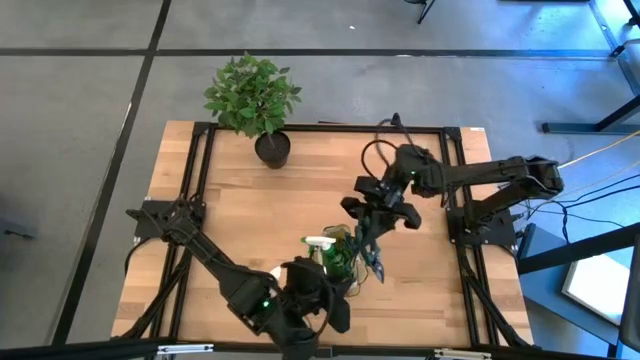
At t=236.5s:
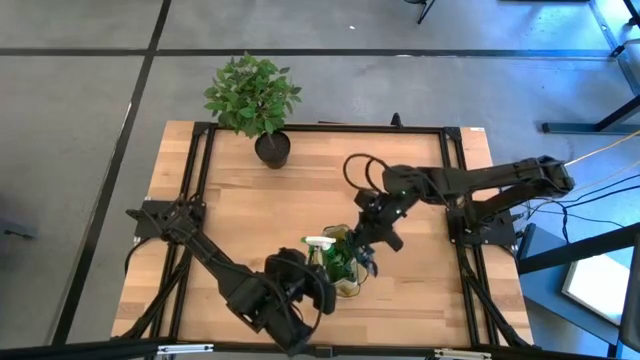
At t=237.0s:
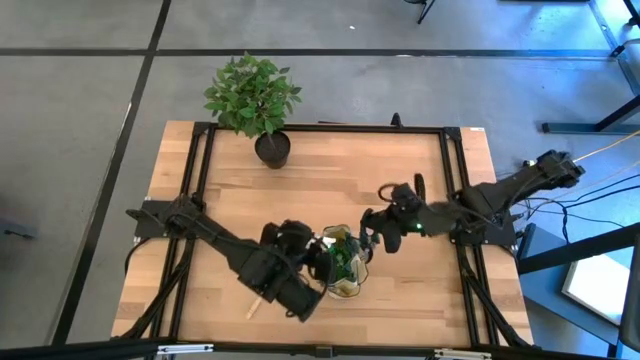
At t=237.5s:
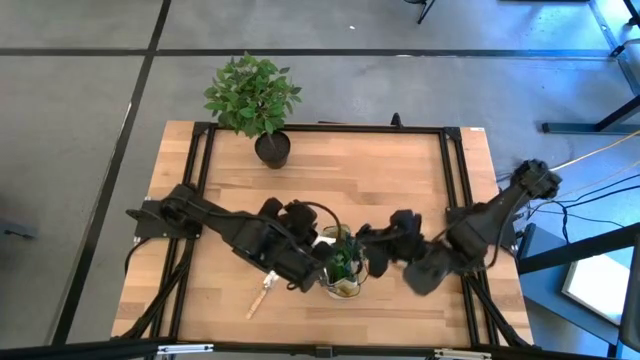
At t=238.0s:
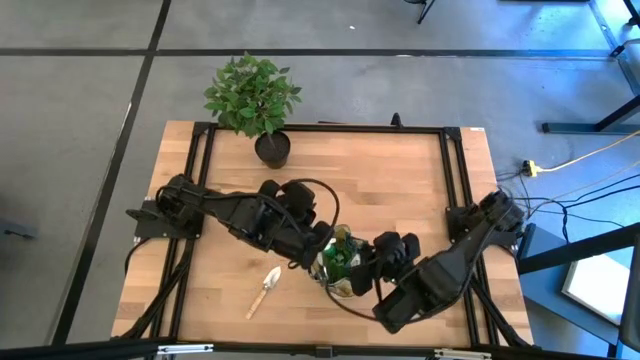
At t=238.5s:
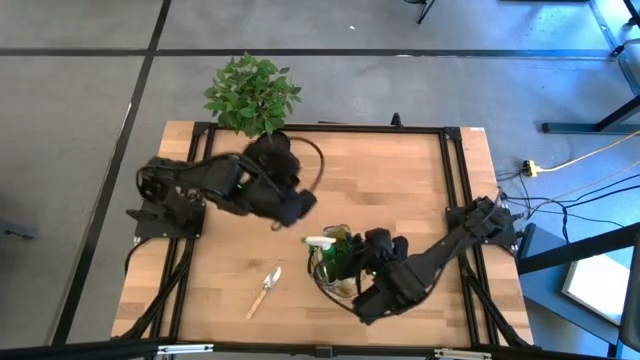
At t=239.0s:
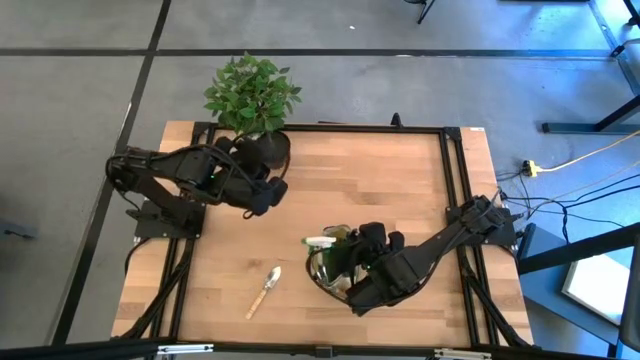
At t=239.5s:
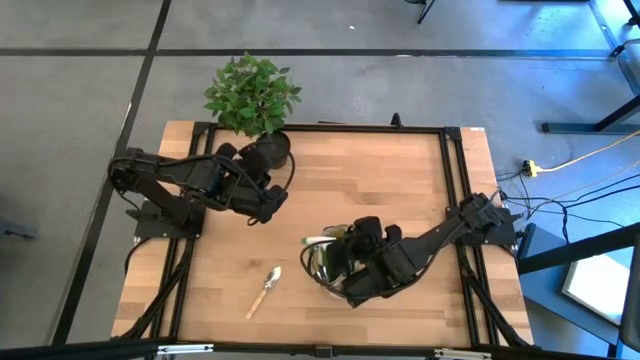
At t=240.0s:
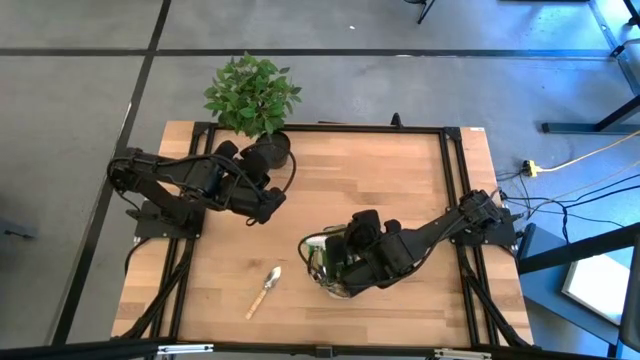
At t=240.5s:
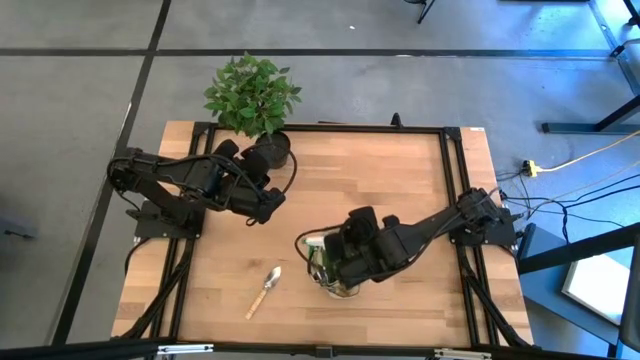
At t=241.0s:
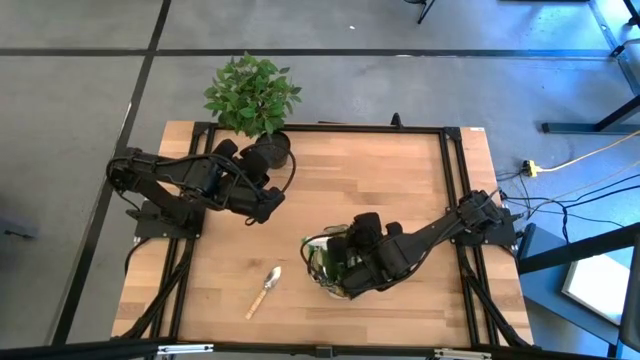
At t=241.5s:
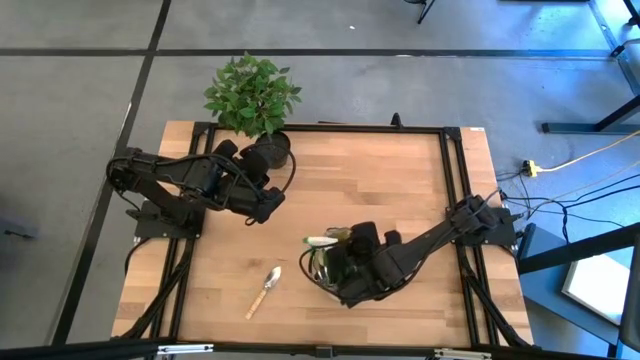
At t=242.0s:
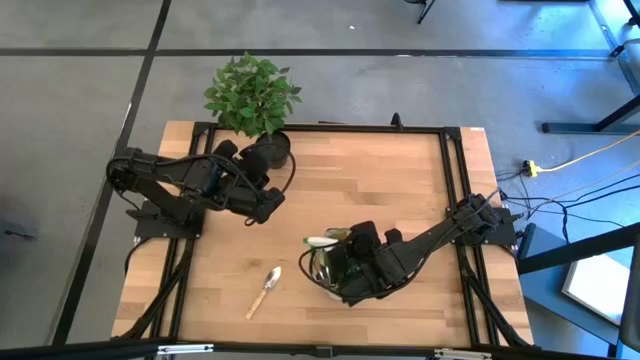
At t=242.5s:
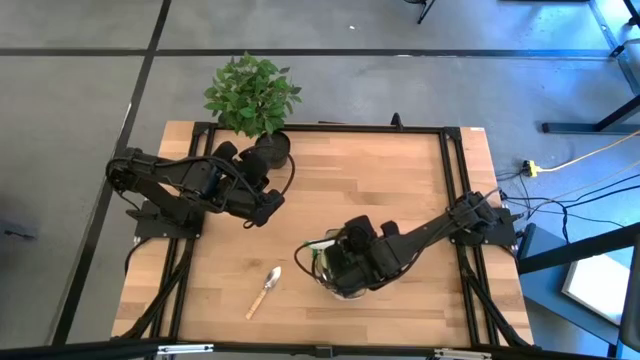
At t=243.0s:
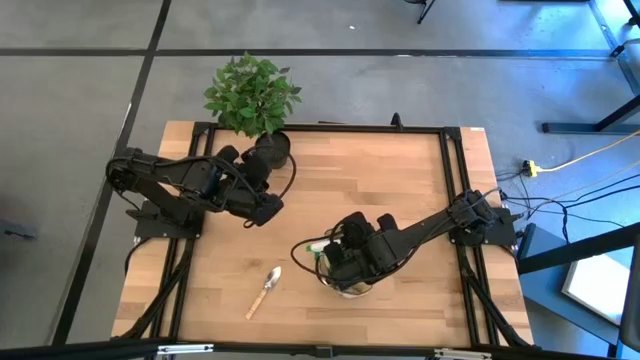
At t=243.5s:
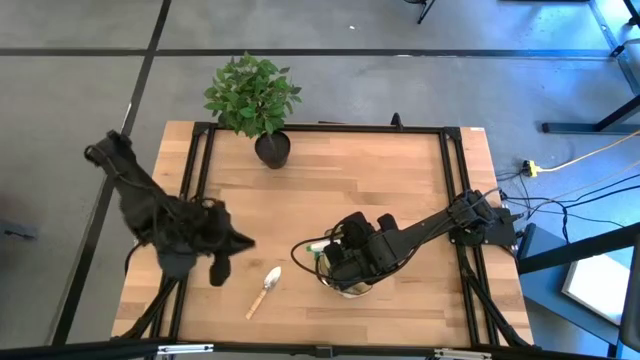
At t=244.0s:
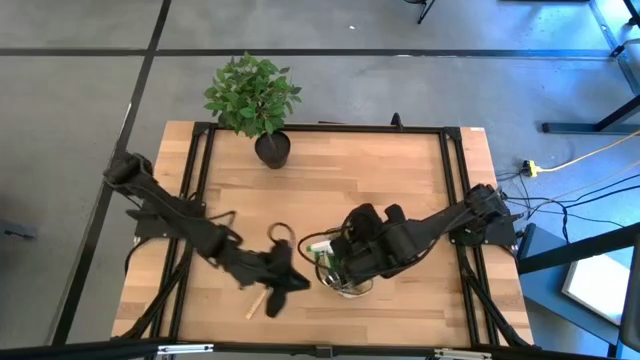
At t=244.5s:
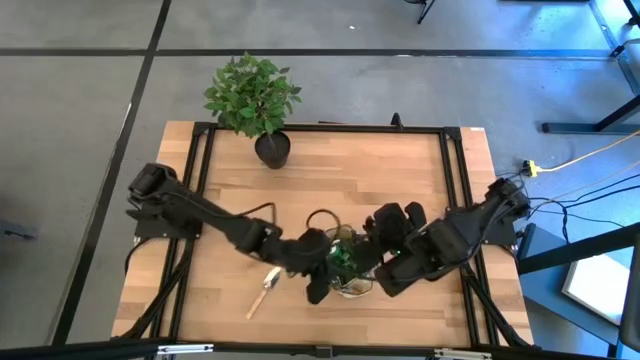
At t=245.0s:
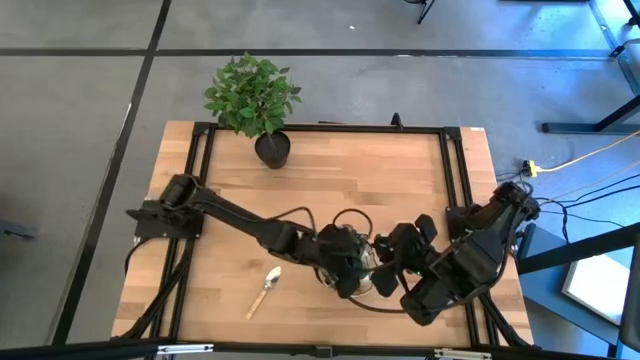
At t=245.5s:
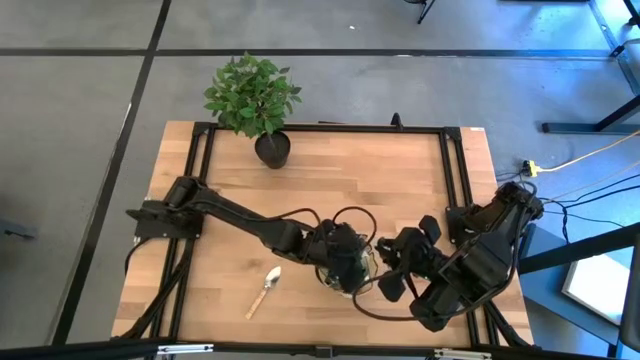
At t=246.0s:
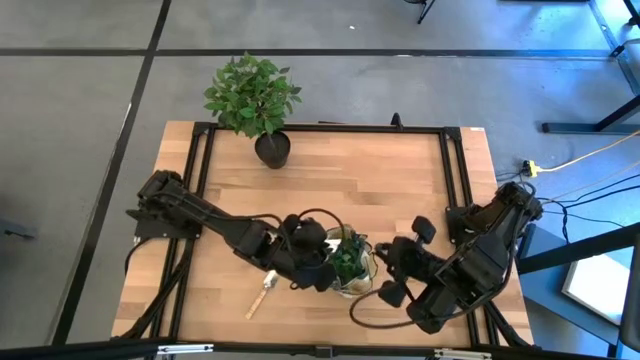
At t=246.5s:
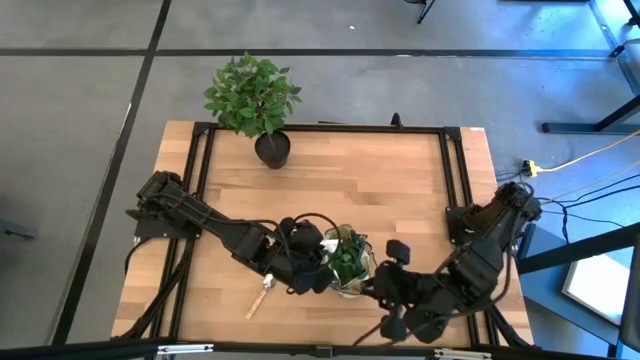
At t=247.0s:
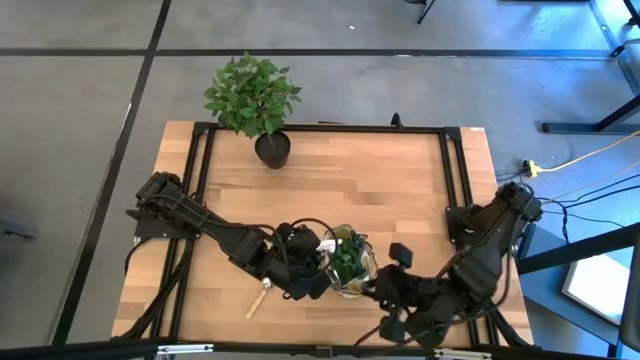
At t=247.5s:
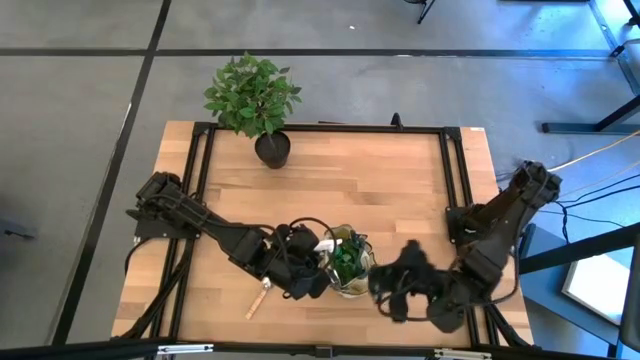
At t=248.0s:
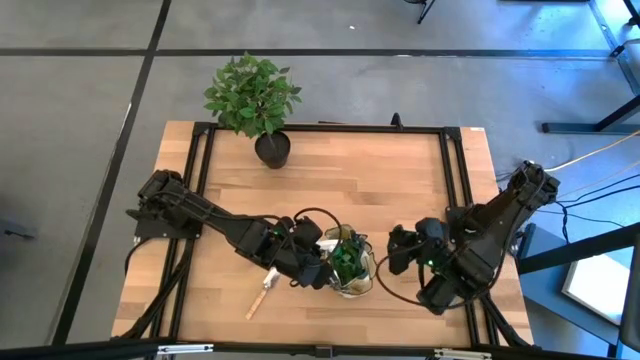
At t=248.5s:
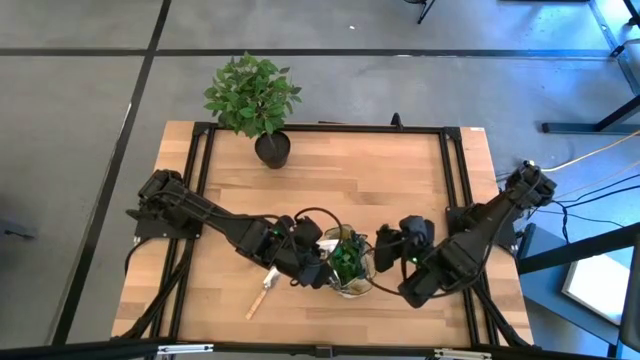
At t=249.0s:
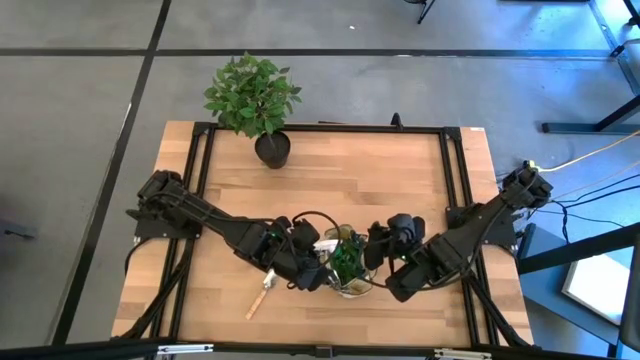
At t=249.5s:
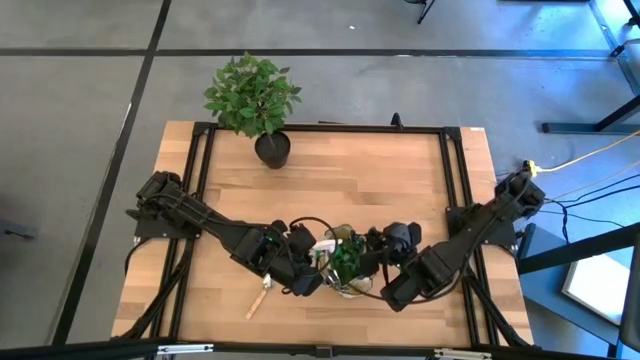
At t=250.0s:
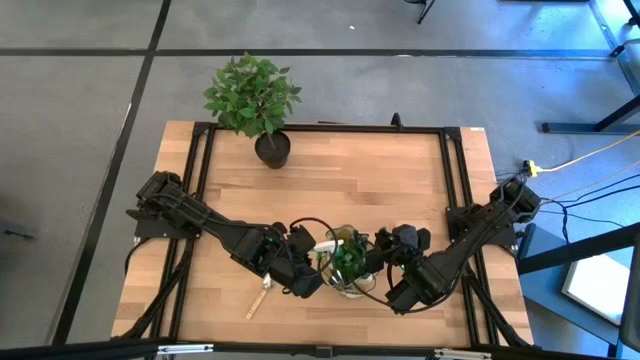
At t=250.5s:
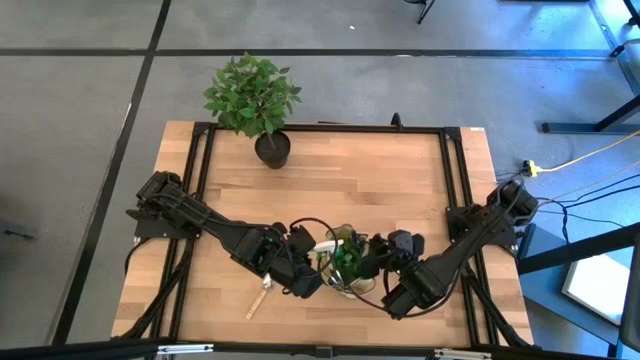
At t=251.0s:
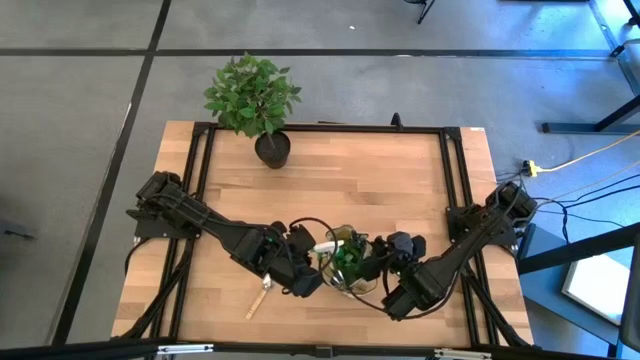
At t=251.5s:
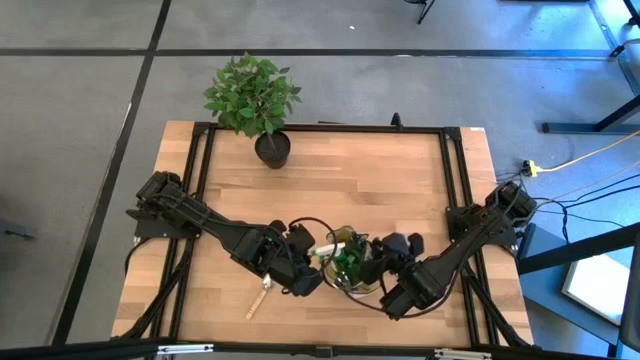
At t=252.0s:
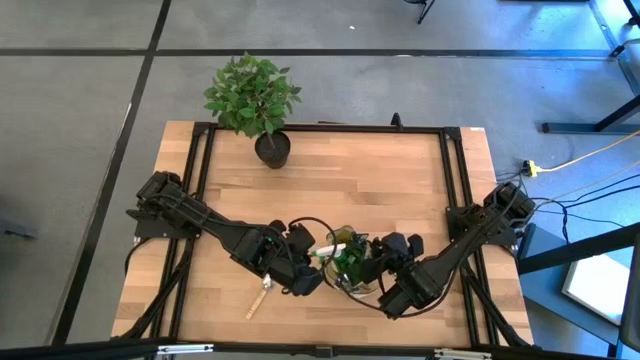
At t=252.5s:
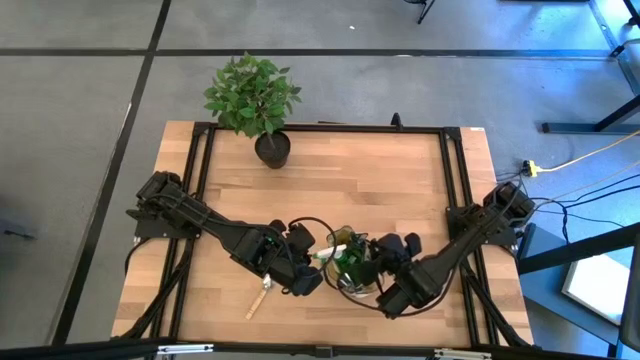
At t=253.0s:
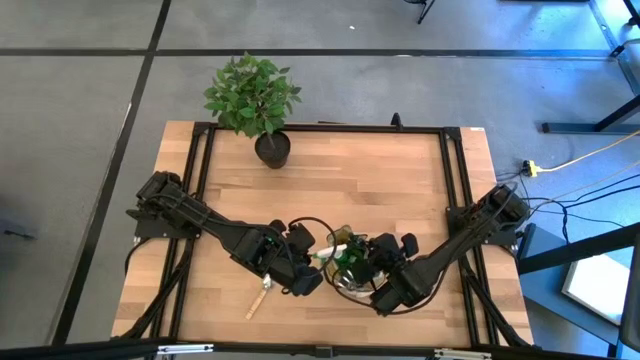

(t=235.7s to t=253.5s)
Task: Pick & Place Garden tools in Gardening bag
Put the green shear scissors into the brown gardening bag

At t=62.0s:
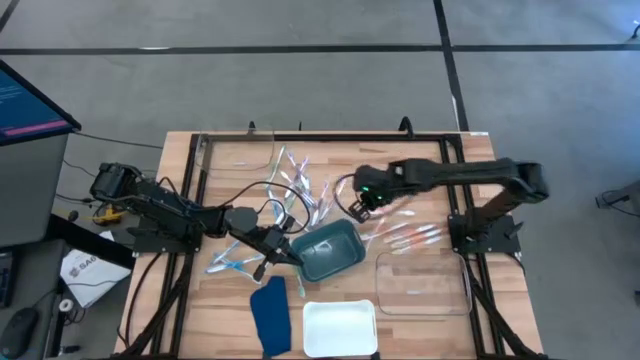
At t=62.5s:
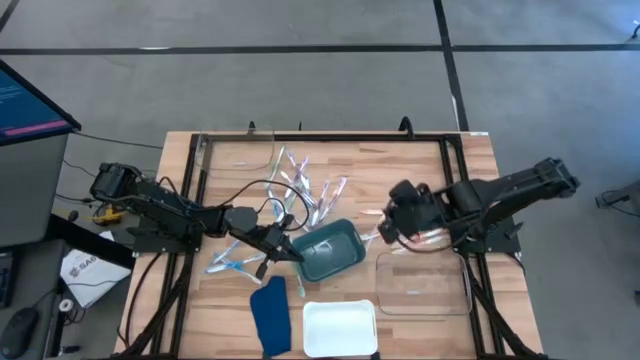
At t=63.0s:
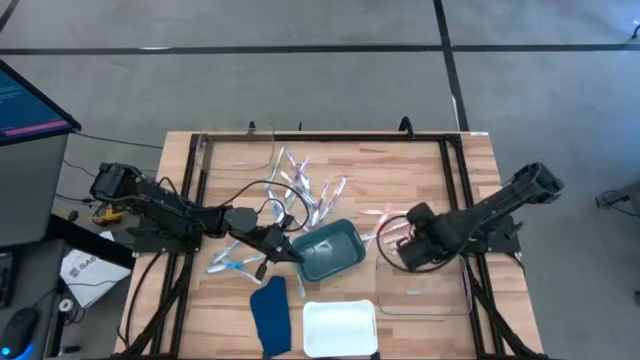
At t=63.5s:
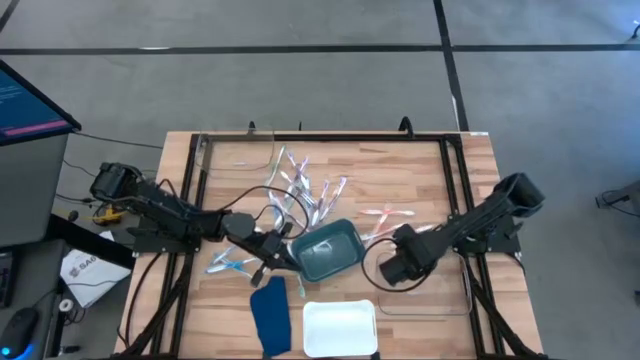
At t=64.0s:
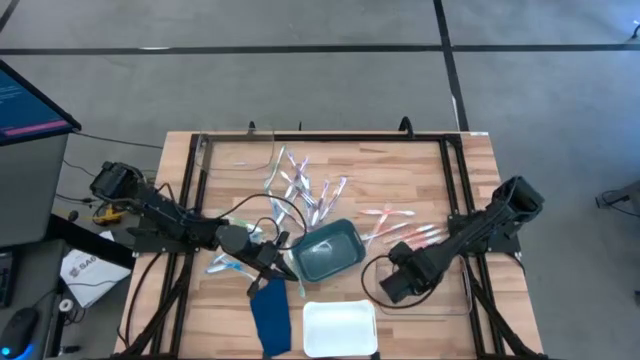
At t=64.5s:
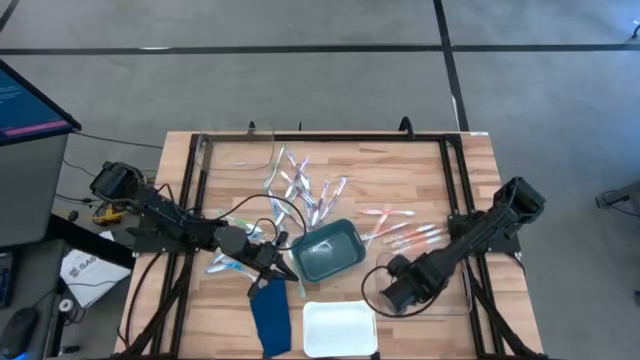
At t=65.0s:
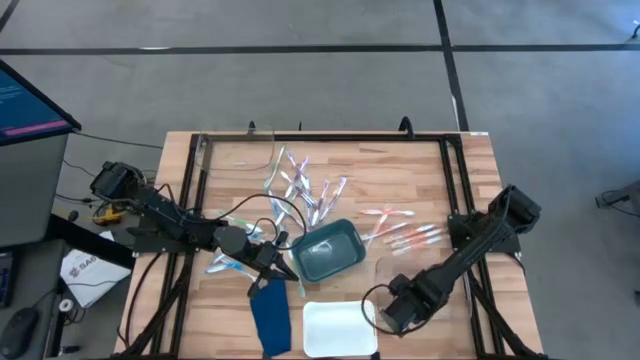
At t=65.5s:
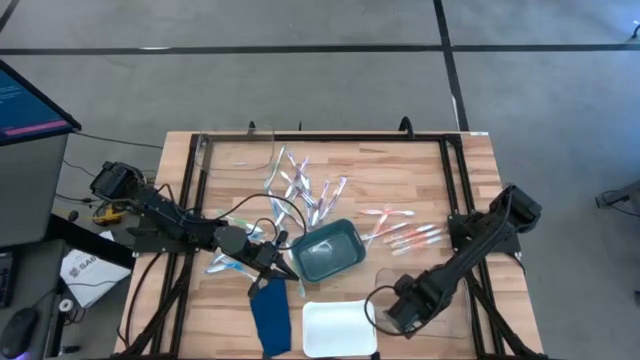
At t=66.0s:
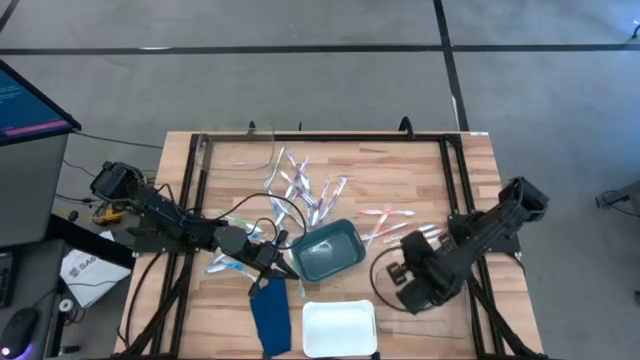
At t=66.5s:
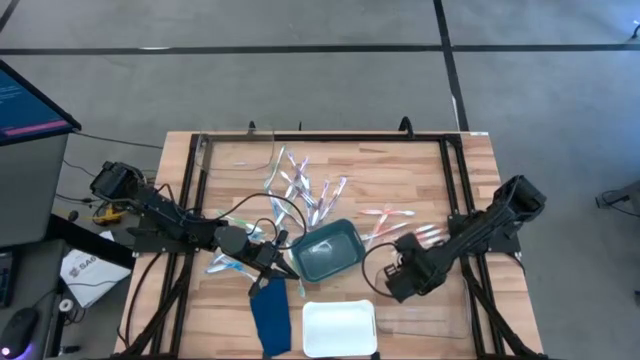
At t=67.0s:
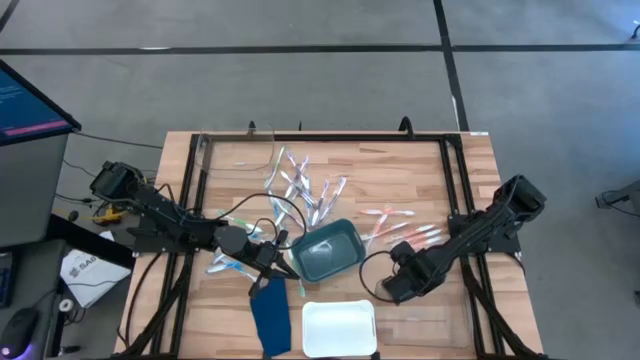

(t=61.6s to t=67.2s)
Task: Pick & Place Toothbrushes
Adjust the bottom transparent bin
